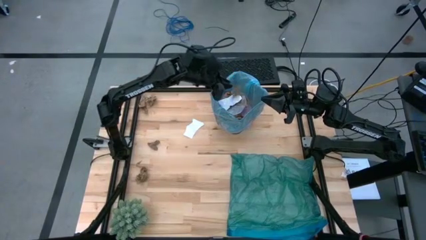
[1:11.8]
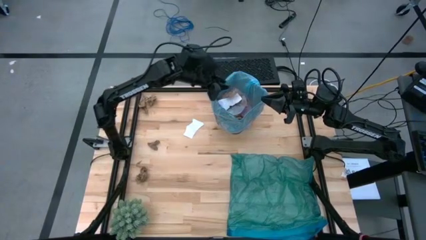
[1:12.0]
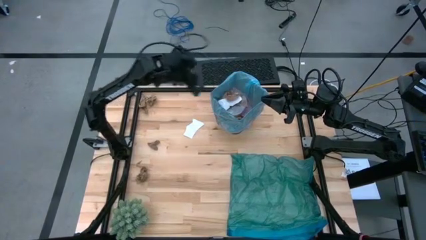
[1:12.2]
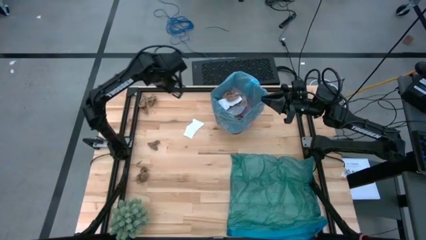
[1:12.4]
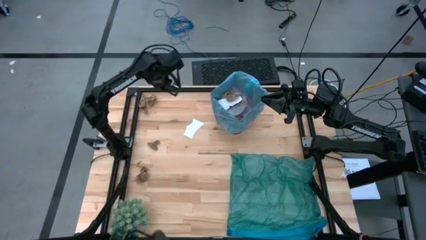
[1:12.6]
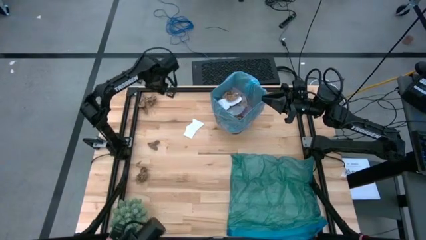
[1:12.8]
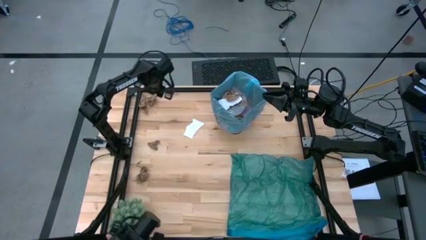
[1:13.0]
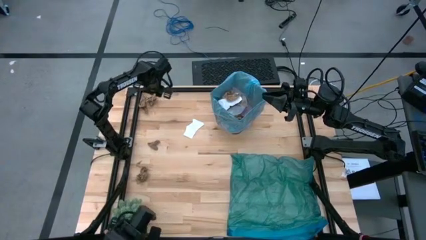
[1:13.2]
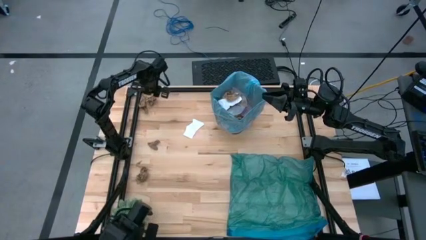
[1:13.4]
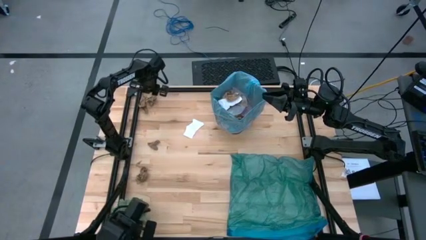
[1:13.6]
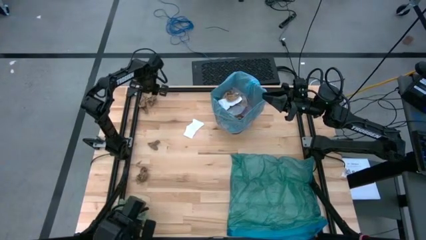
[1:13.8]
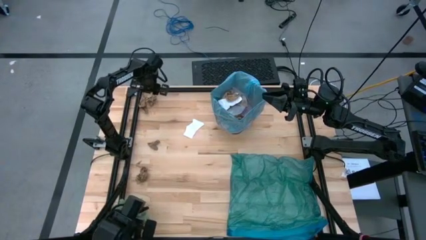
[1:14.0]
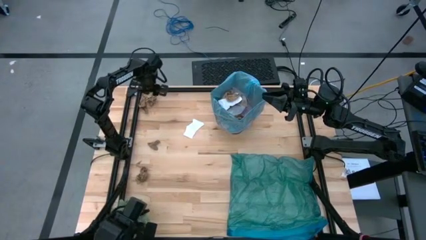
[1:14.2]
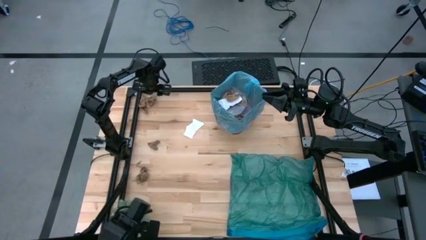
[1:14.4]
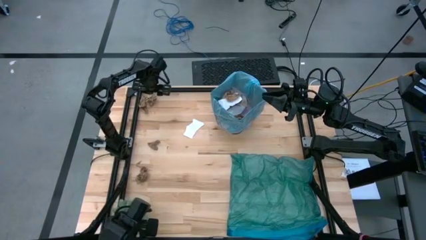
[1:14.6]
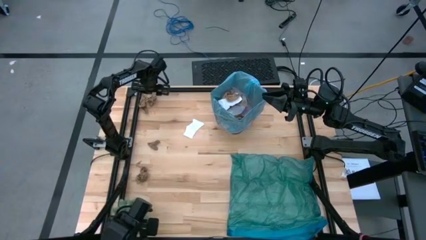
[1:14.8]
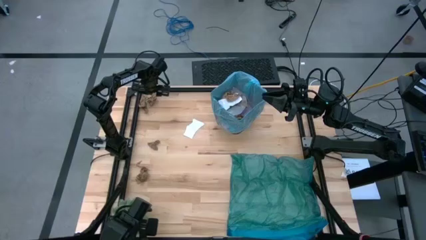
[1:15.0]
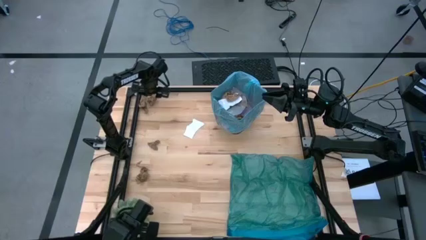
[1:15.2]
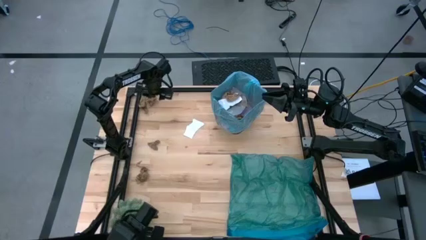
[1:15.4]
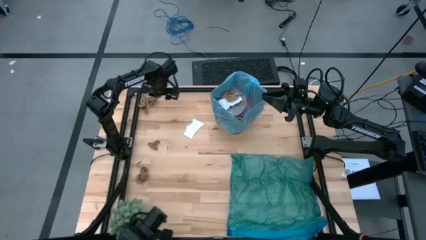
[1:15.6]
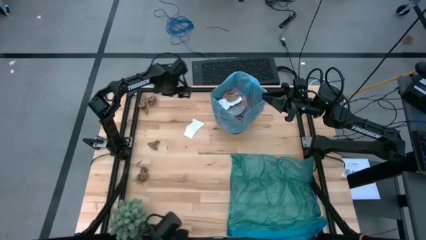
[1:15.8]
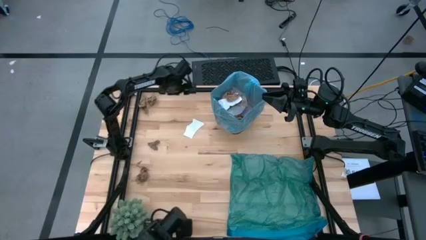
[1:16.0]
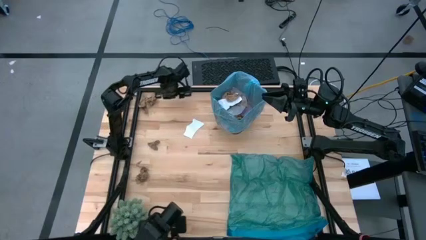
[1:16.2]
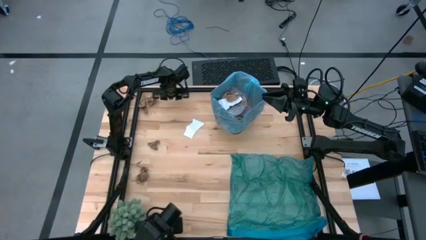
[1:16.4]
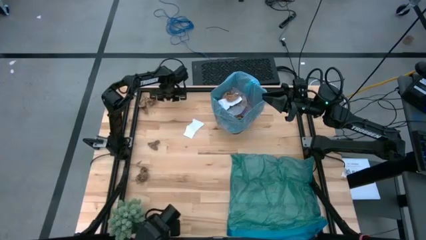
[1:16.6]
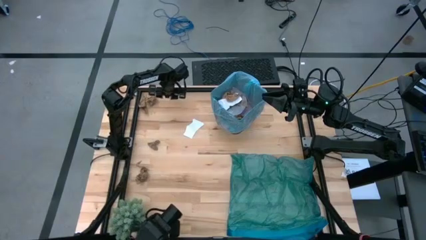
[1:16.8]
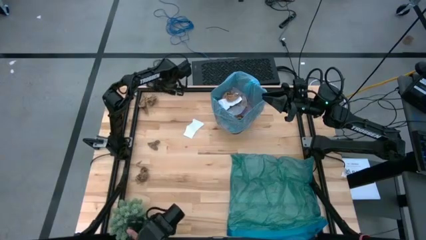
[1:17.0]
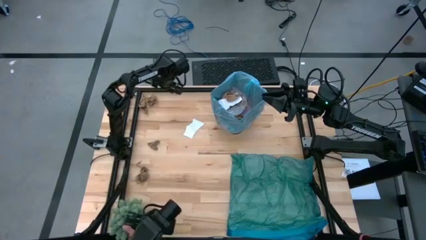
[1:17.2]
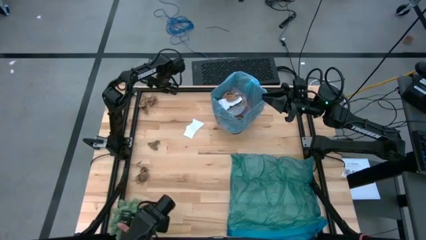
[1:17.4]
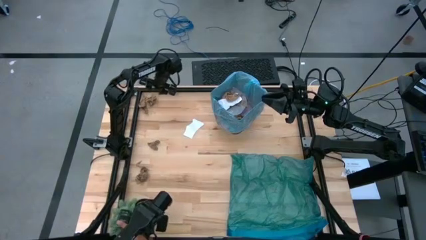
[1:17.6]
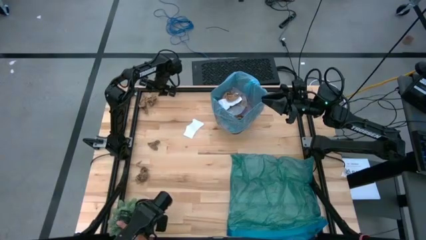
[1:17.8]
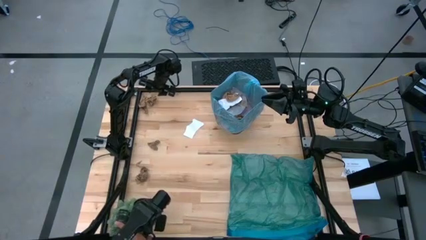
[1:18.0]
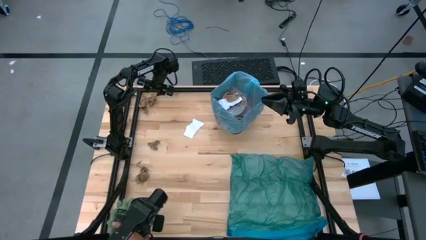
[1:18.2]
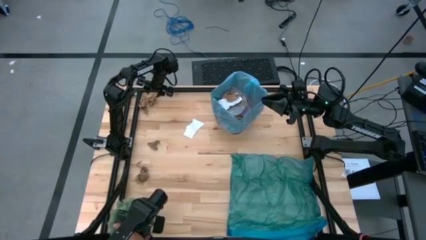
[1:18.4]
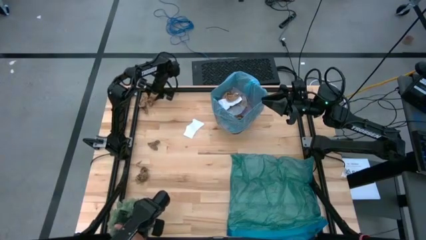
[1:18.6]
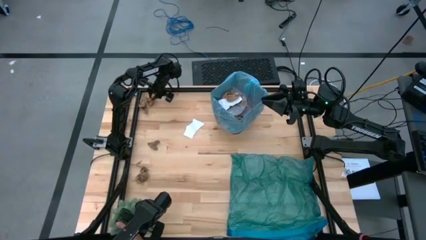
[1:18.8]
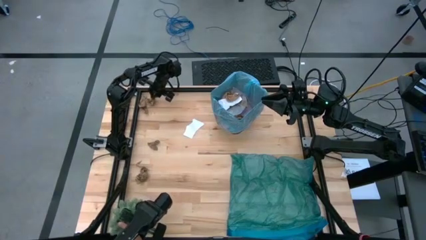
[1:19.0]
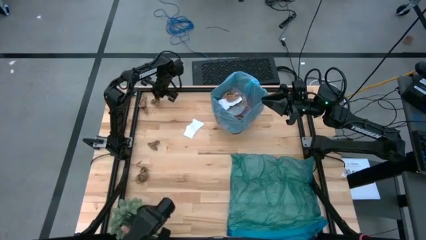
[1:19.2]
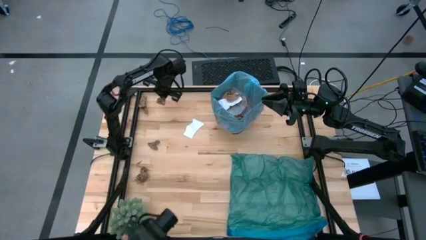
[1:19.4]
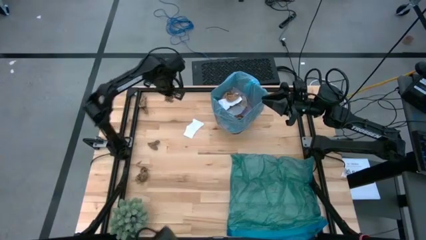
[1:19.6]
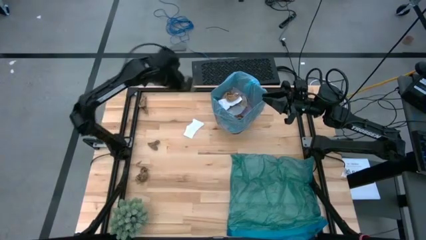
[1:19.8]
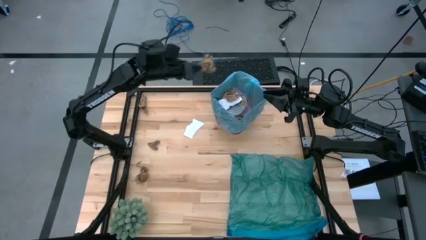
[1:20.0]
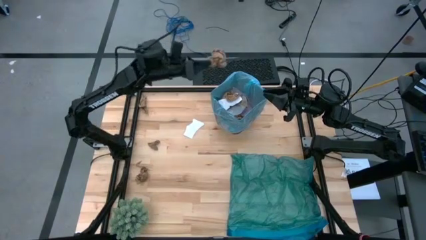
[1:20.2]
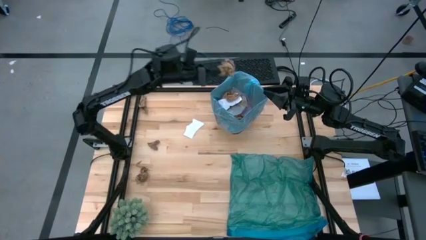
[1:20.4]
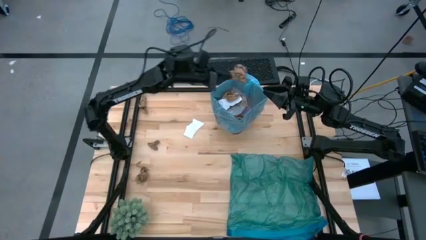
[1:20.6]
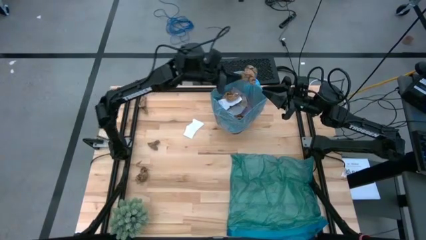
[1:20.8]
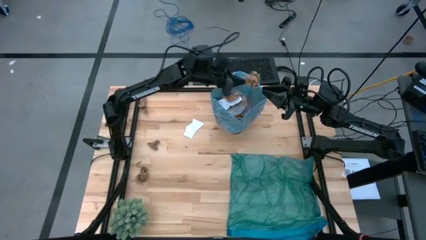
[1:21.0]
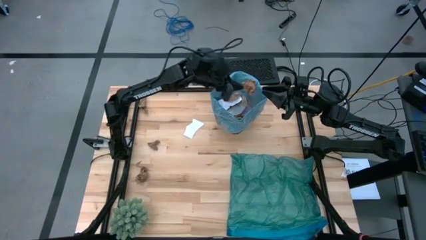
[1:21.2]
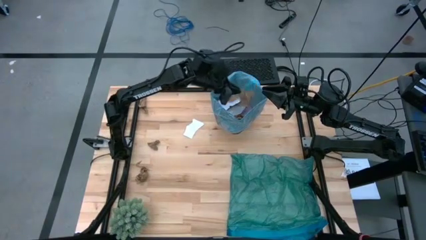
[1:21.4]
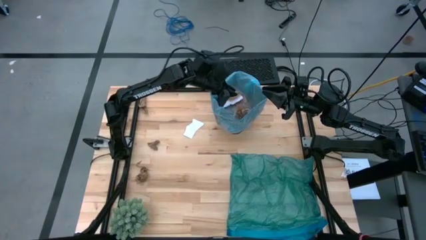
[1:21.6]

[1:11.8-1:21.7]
Task: place trash/remove bag and relplace
Put the brown napkin into the black trash bin

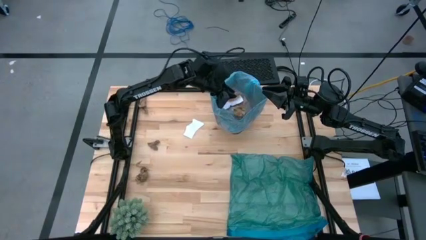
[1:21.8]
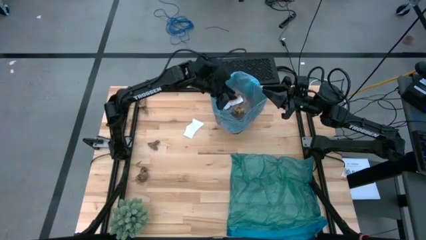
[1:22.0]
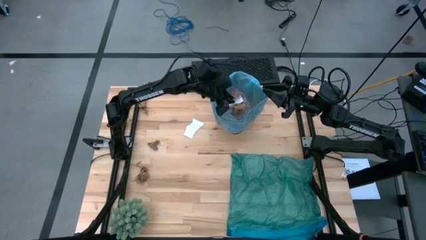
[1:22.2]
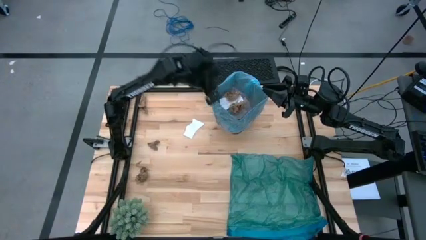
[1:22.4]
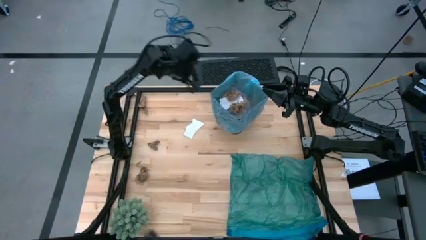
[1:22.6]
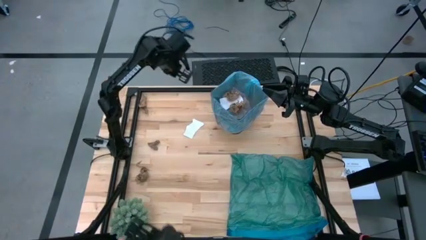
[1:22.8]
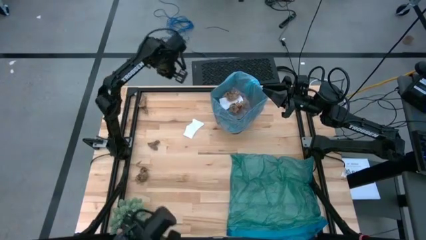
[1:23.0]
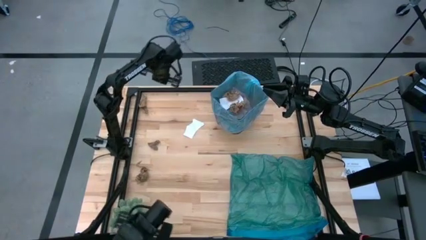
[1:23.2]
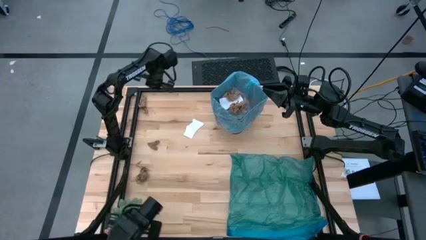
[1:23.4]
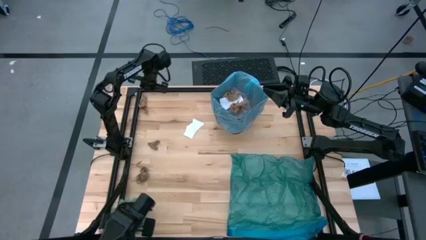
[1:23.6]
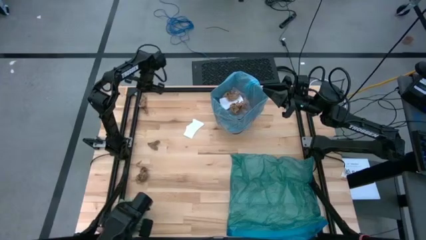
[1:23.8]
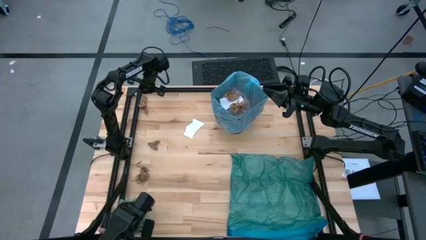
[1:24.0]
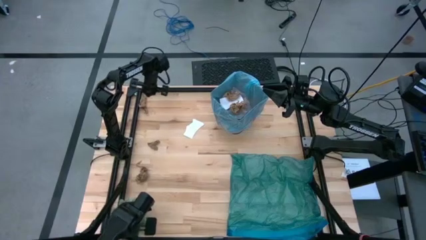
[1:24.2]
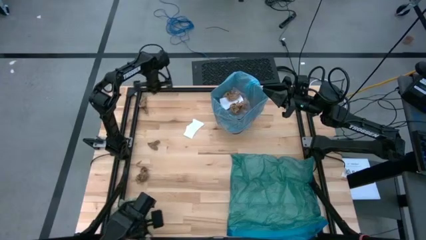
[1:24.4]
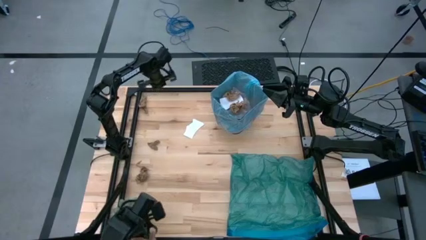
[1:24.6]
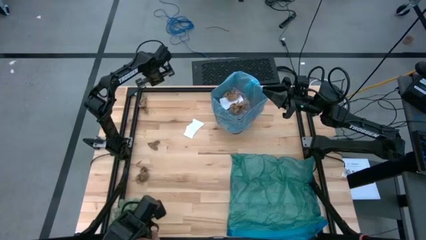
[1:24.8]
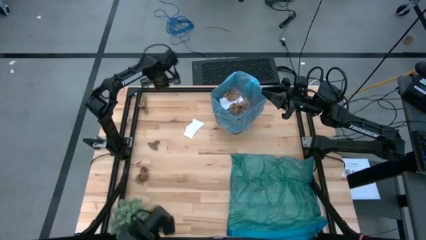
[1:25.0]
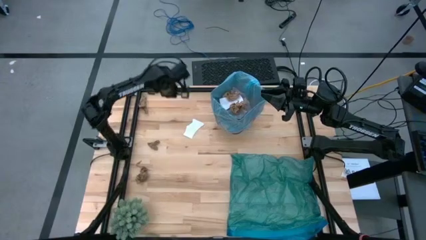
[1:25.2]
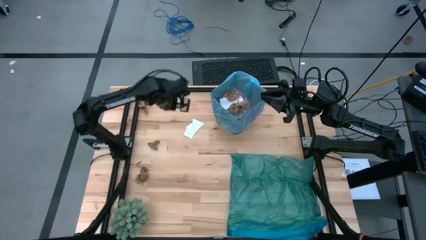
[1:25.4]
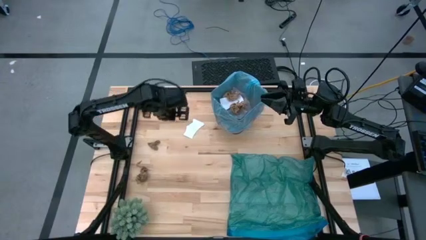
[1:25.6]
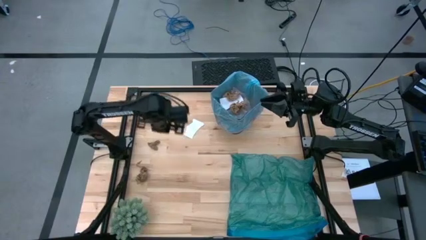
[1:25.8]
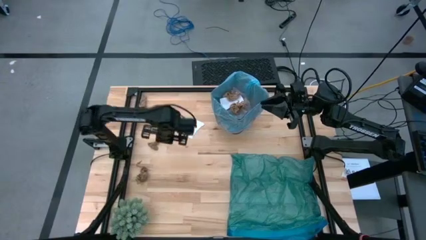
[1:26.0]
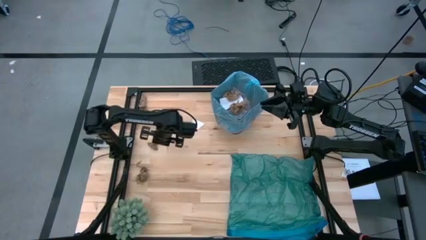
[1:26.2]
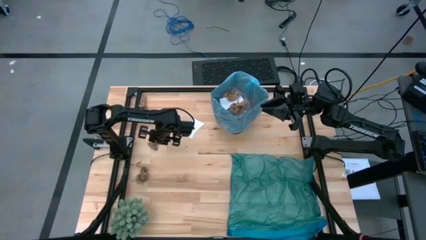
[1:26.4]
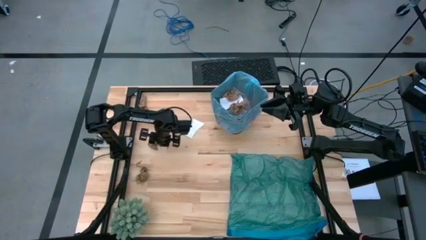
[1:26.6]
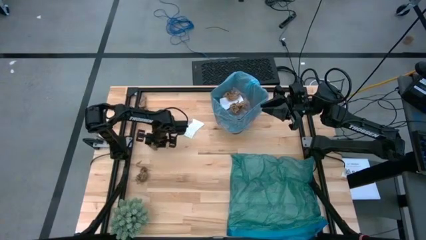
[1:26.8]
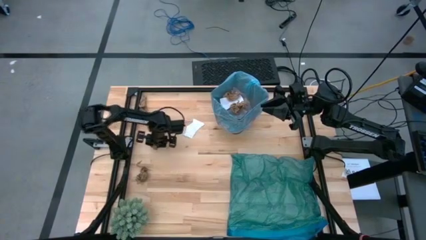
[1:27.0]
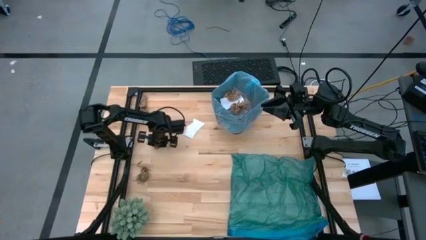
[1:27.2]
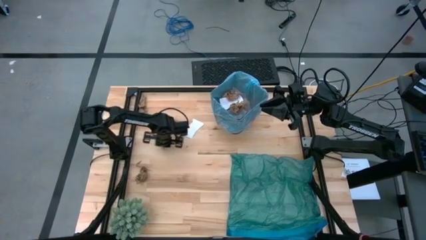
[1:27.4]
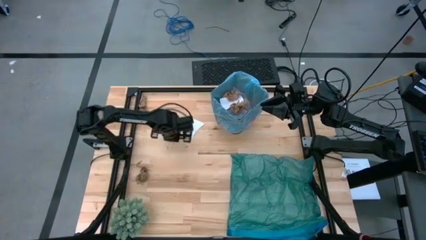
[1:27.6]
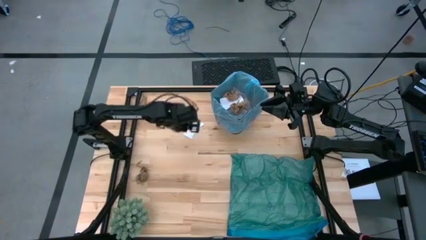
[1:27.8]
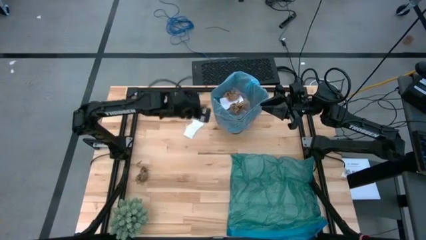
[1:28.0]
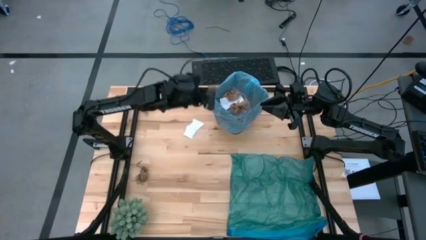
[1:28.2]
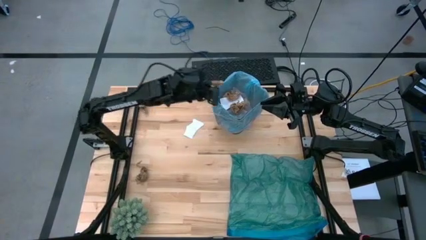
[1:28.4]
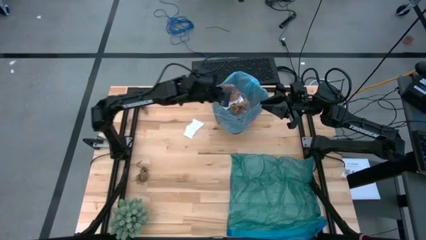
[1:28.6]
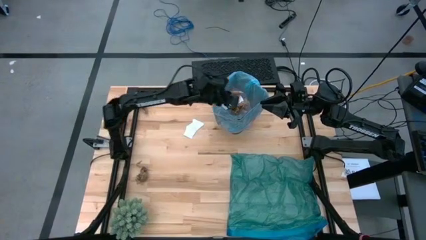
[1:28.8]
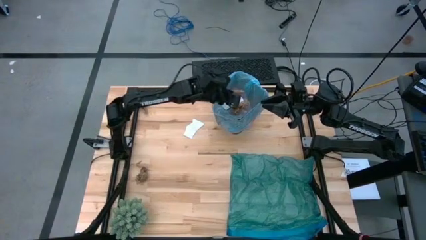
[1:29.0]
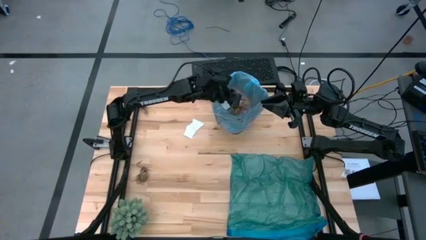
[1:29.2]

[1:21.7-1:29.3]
Put the brown napkin into the black trash bin
